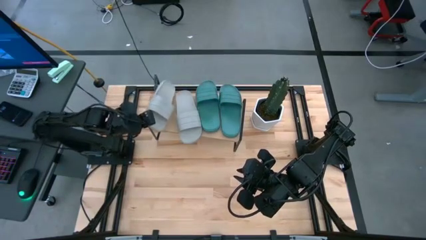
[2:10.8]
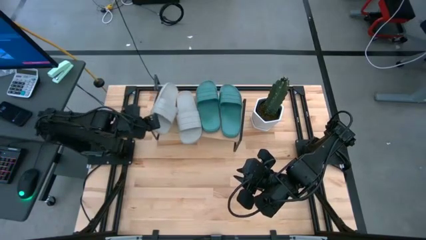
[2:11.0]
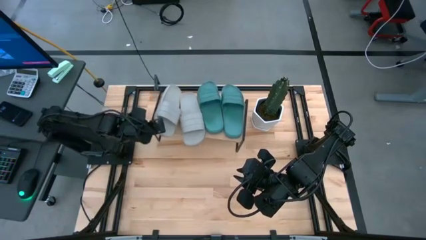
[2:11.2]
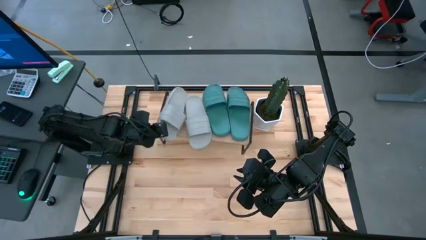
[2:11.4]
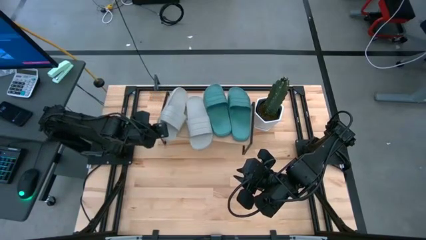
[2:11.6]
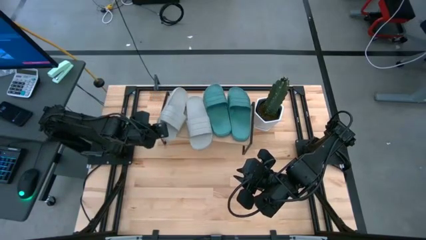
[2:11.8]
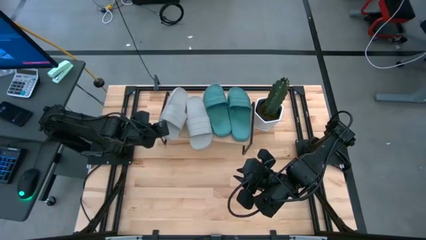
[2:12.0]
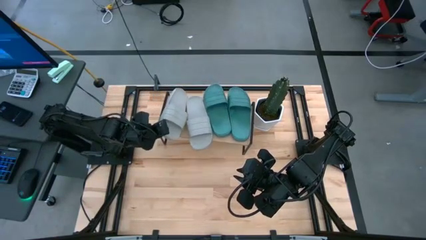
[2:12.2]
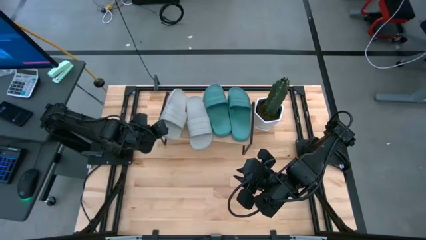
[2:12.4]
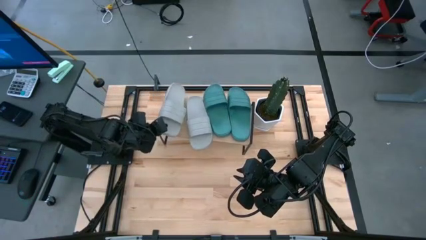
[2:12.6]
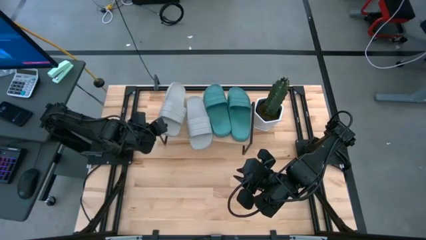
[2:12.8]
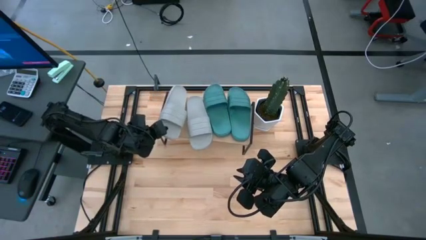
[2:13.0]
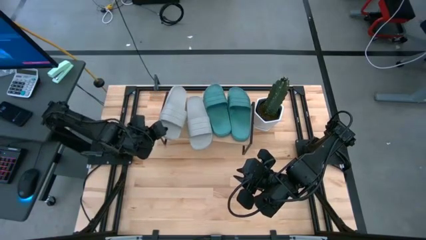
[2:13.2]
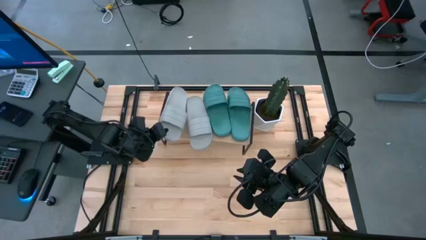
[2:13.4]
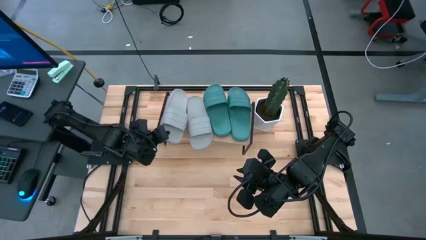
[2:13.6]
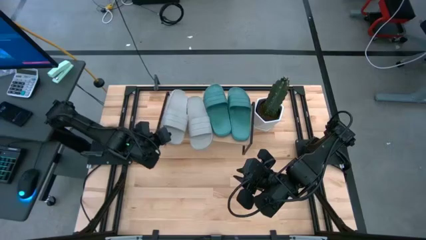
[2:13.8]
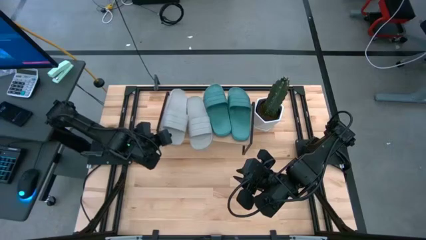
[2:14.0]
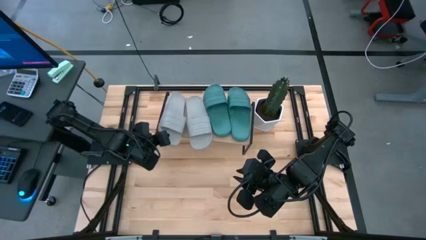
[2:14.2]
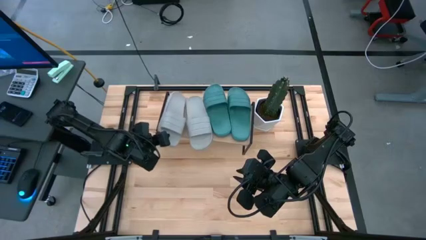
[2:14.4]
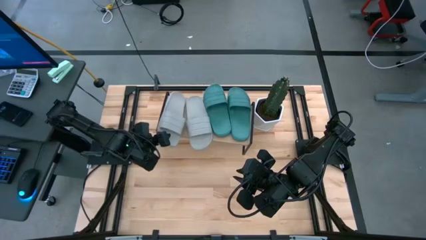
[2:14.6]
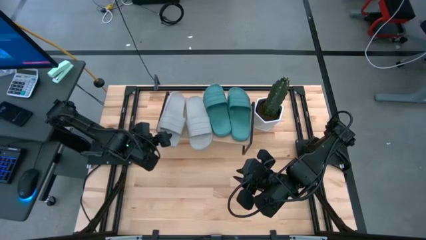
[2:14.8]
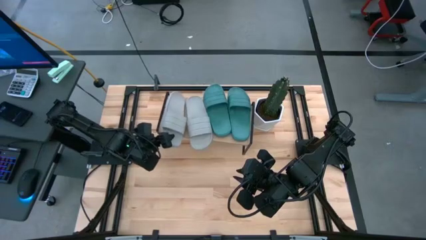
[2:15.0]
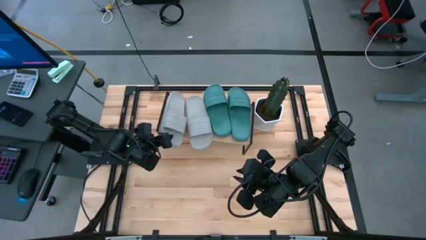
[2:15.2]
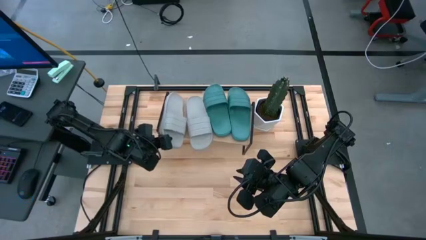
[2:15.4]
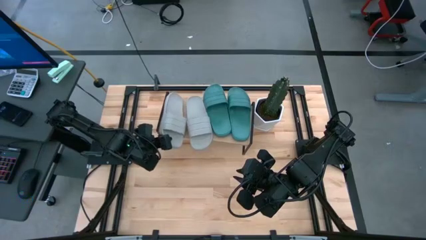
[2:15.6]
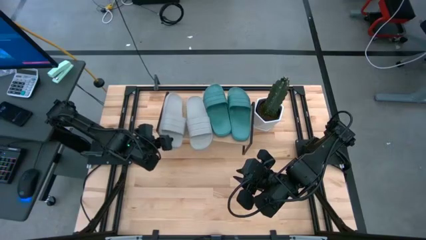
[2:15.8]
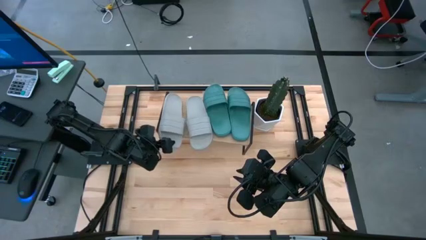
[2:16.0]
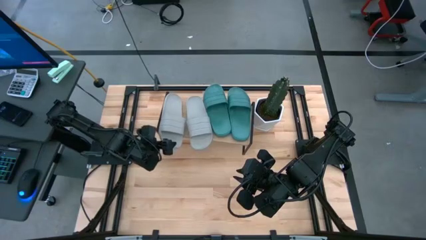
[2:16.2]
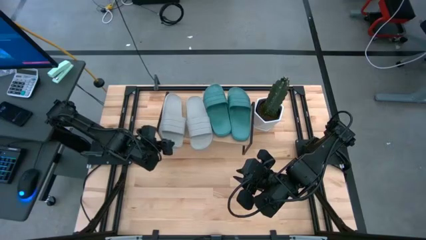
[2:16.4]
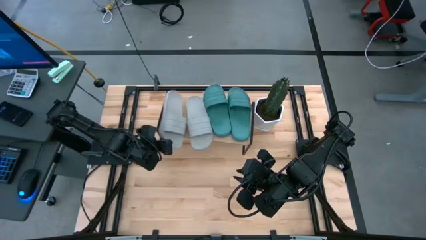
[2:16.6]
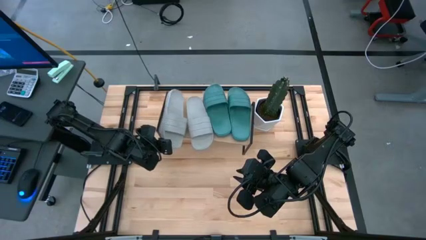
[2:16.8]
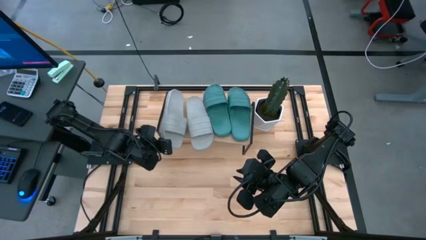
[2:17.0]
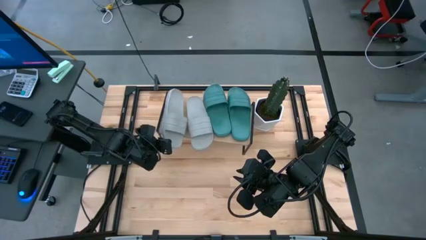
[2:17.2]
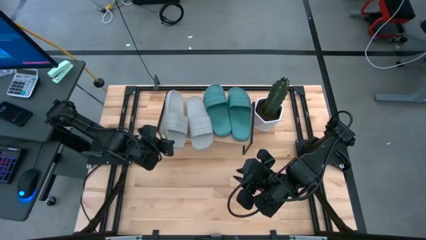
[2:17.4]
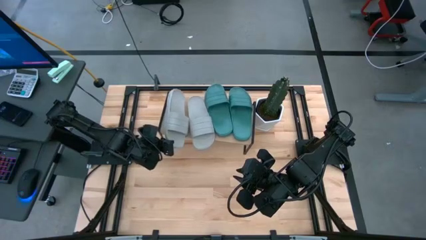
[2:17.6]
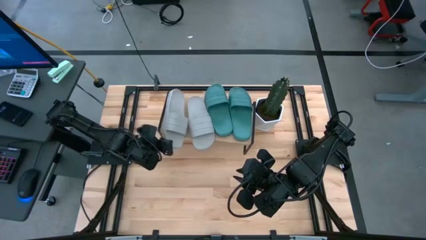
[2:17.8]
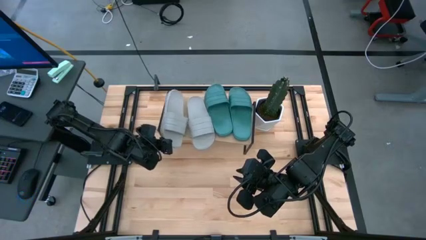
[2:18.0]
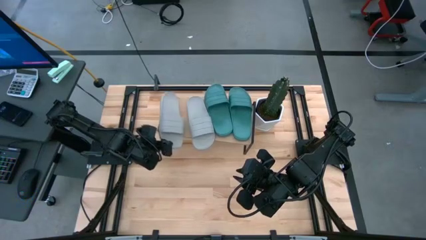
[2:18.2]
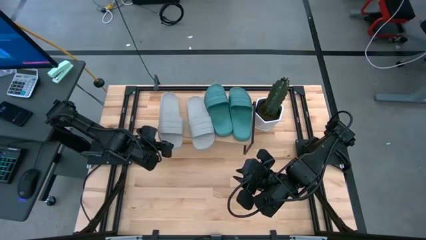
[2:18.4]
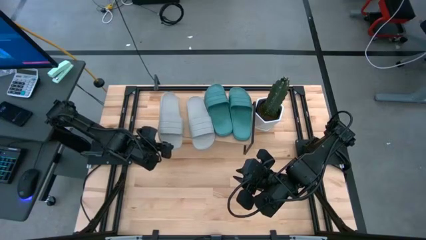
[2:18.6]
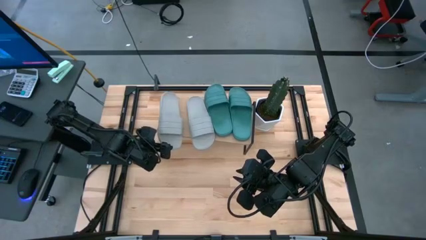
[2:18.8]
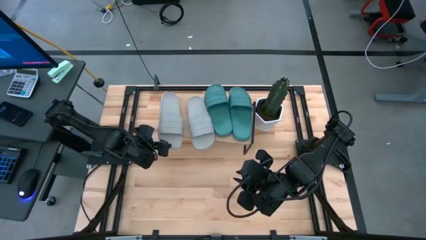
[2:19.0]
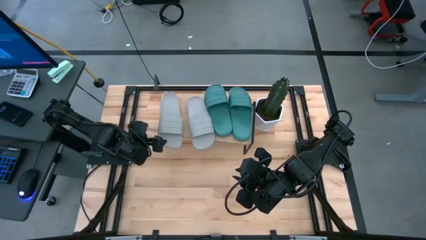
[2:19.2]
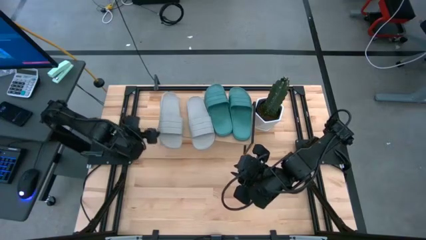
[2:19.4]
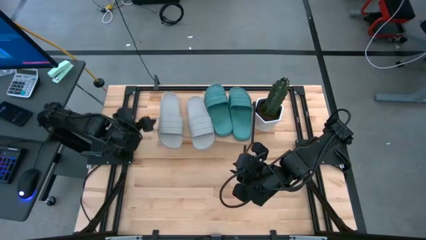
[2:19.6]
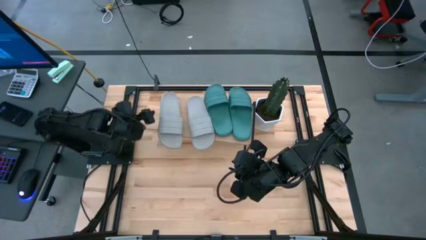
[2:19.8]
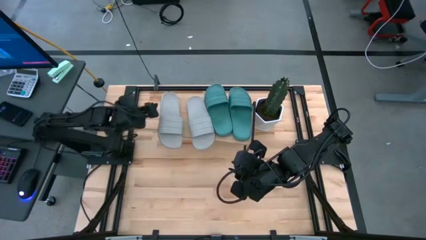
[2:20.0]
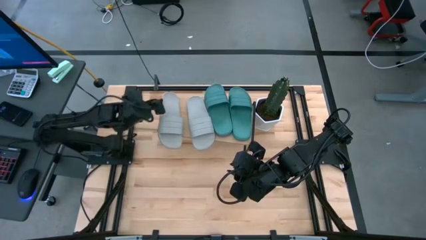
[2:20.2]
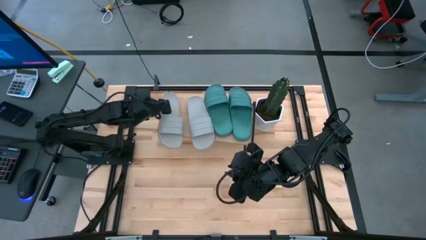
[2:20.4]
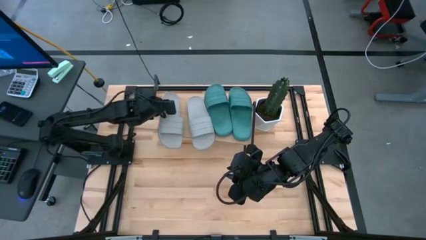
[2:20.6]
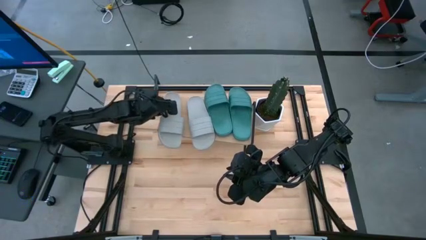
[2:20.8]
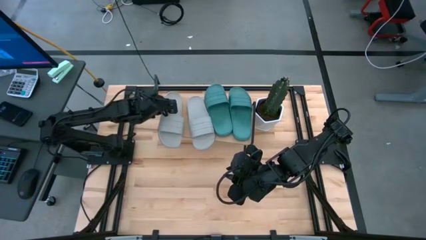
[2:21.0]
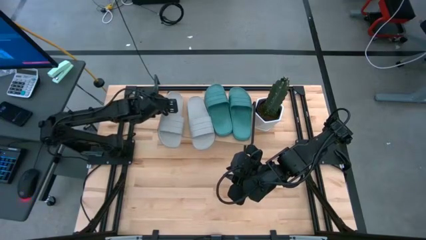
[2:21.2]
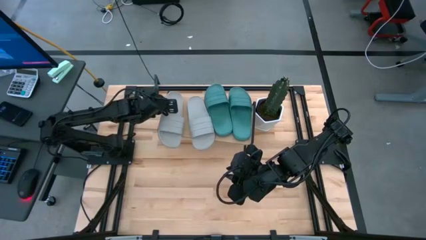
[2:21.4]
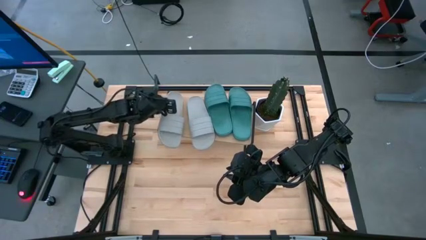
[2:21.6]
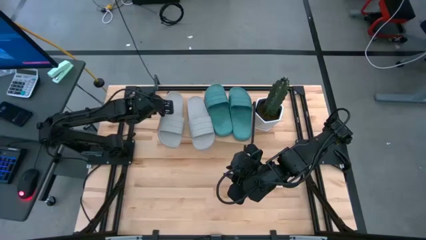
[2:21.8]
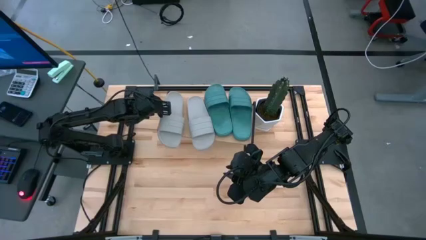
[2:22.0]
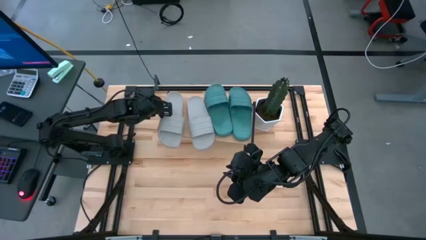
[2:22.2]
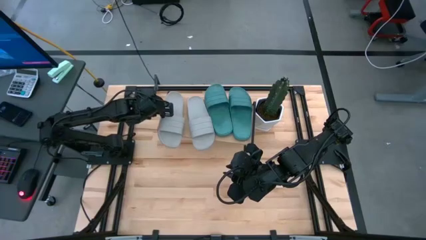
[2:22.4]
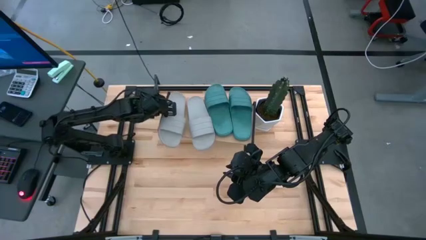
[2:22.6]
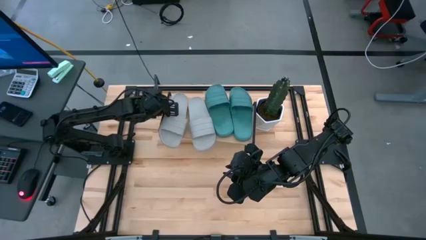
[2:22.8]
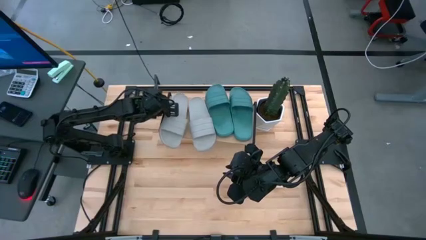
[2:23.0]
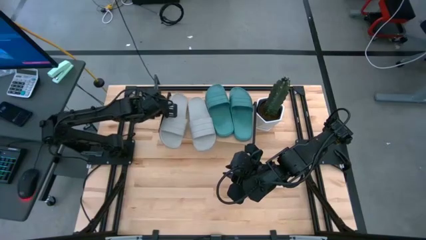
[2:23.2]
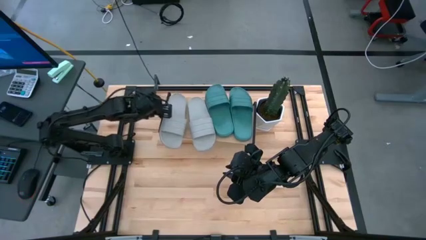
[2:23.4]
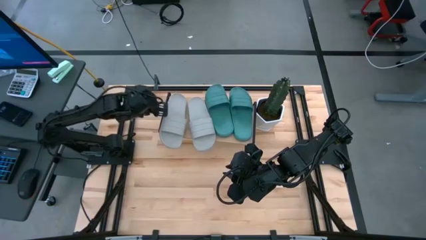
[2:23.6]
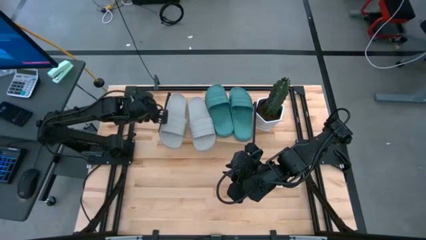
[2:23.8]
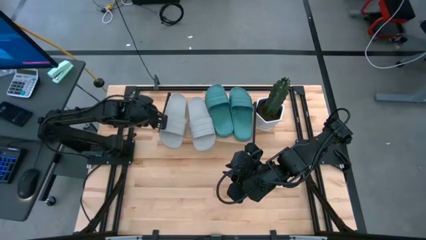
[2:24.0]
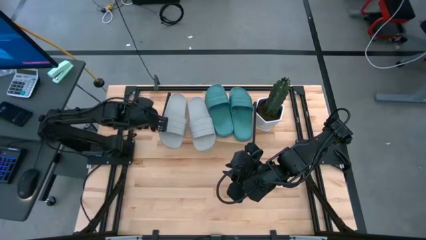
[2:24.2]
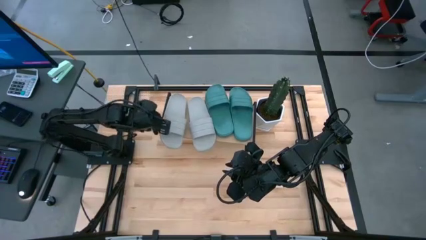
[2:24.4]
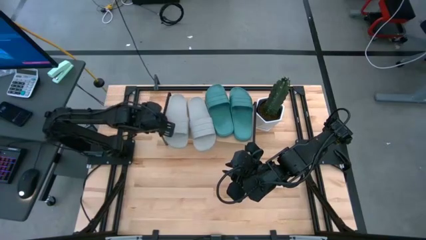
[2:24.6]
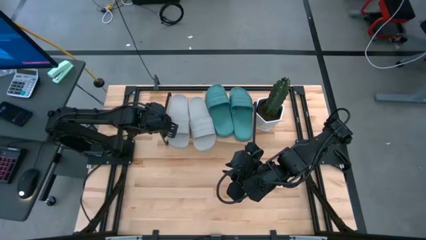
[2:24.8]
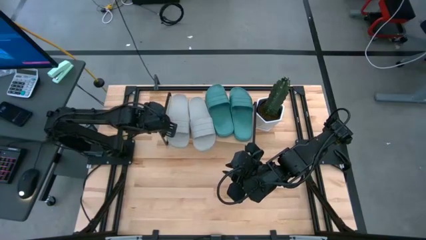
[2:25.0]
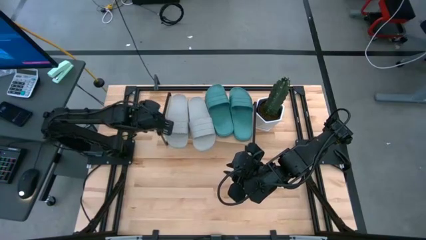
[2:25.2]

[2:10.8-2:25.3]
Task: Pick and place slides into the shelf
Put the gray slide on the shelf

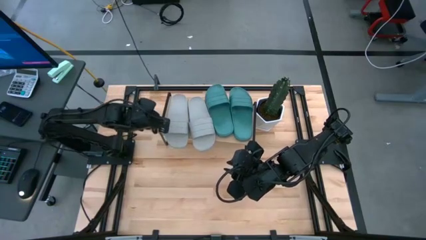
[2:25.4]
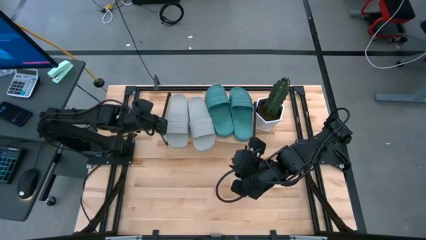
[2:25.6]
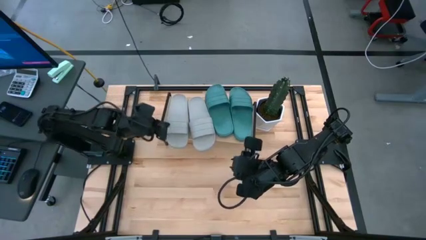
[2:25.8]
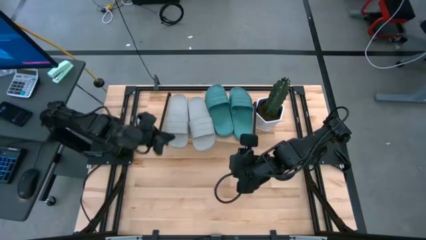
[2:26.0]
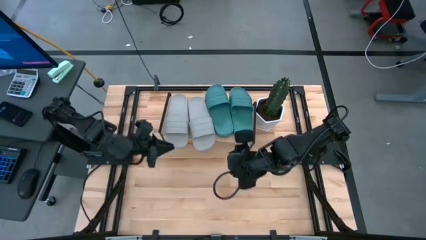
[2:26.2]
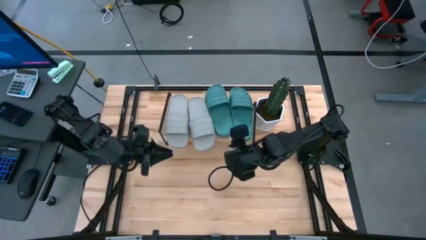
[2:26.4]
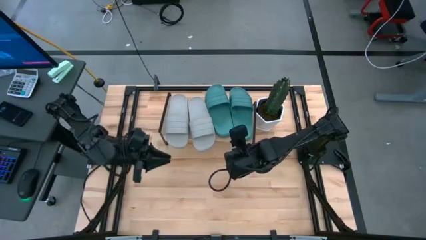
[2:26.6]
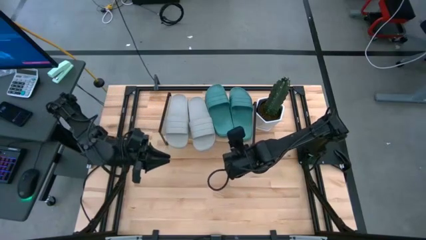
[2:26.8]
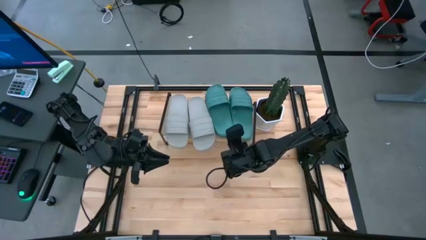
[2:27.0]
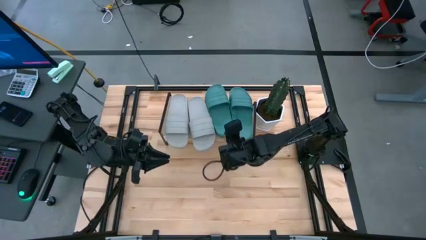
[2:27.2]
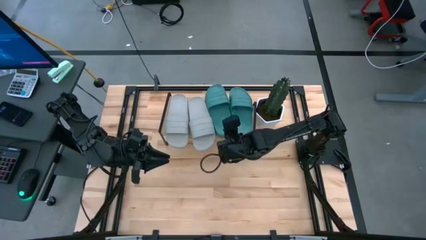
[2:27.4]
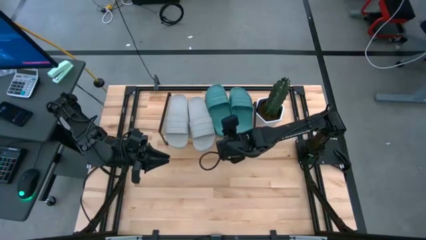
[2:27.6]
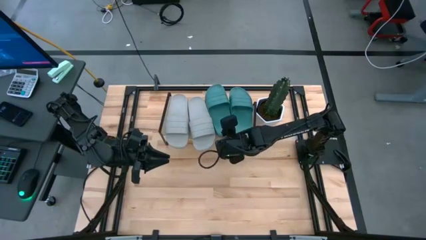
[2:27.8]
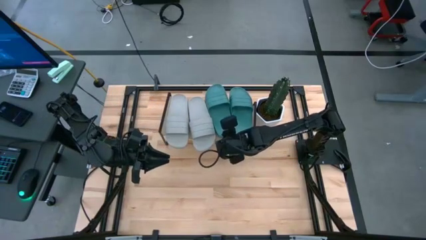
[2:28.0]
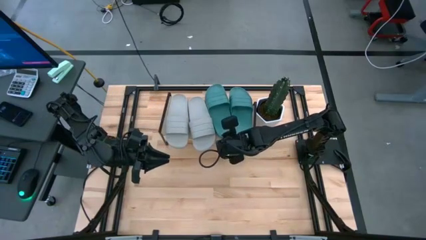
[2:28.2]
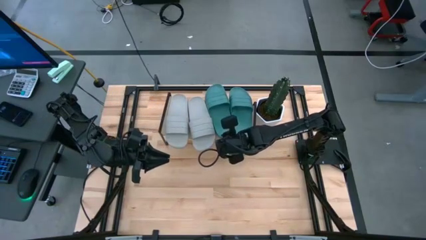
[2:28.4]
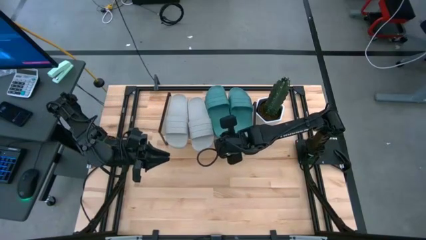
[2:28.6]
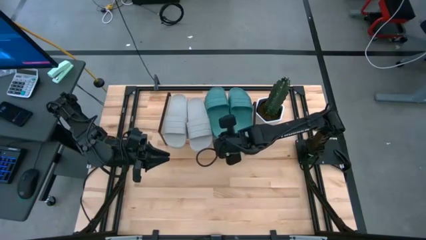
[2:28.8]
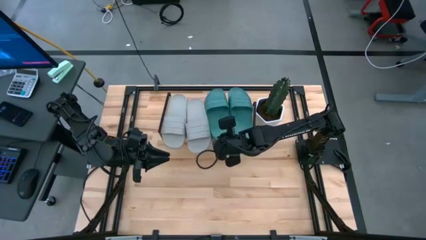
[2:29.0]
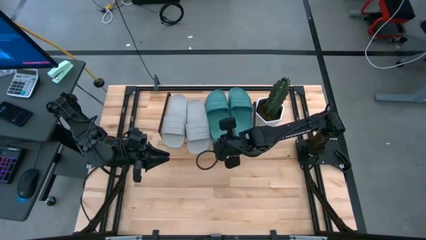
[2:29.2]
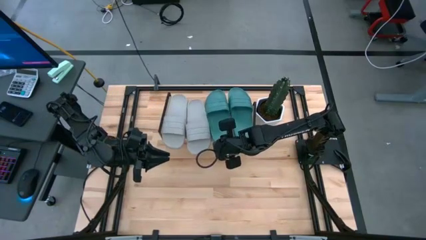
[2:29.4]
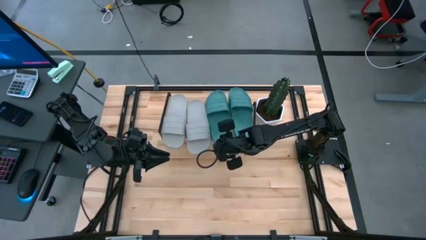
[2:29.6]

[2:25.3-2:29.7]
Adjust the green slide
